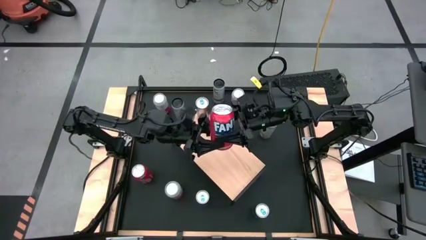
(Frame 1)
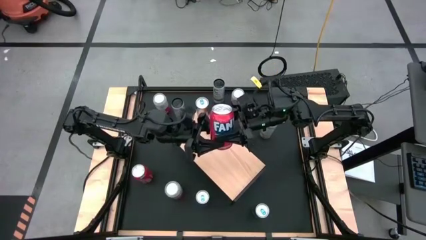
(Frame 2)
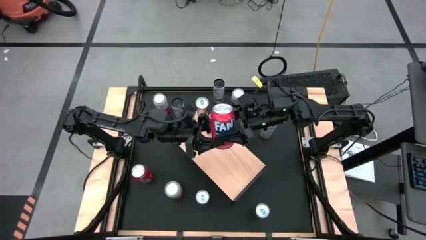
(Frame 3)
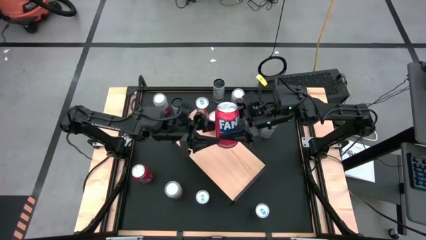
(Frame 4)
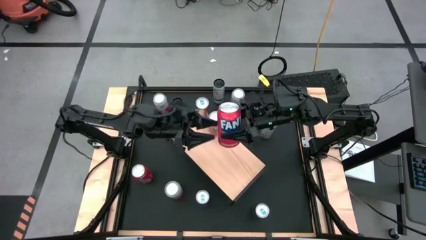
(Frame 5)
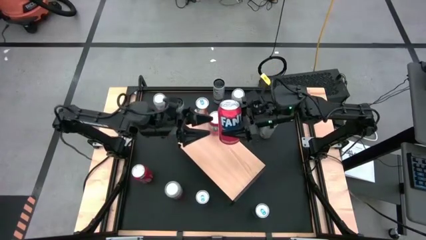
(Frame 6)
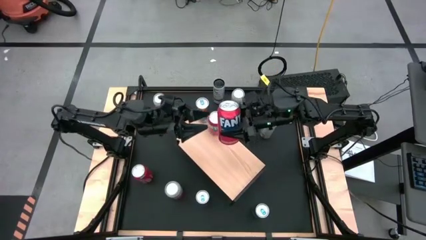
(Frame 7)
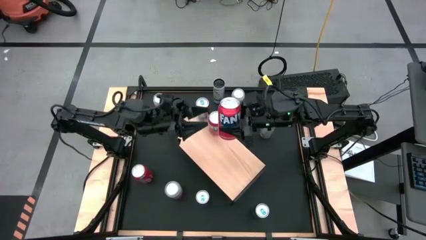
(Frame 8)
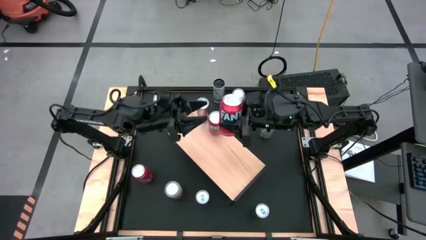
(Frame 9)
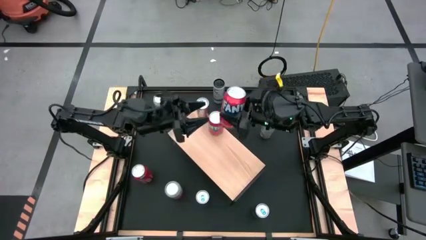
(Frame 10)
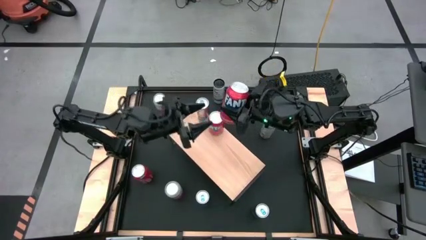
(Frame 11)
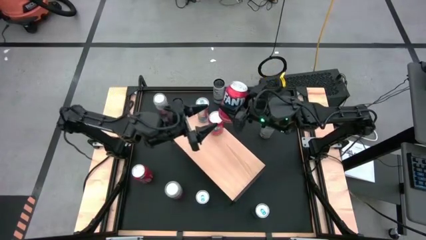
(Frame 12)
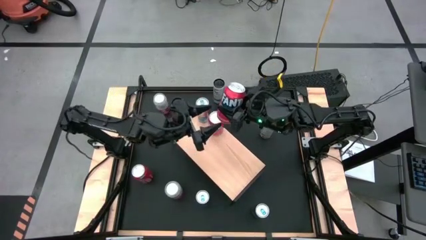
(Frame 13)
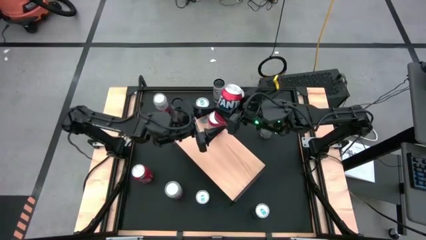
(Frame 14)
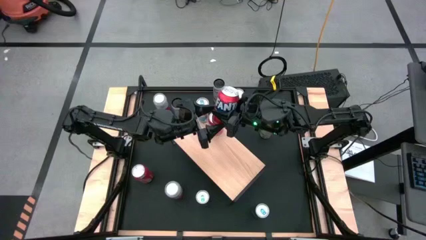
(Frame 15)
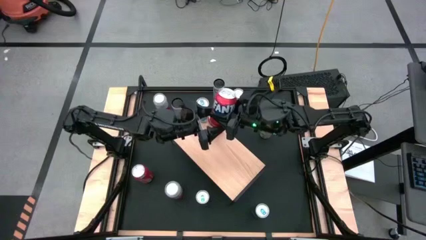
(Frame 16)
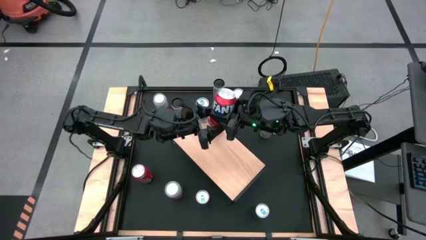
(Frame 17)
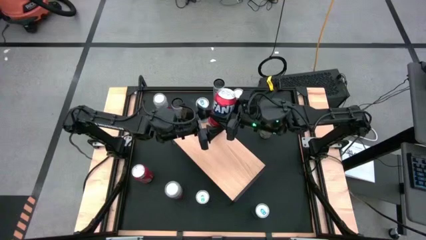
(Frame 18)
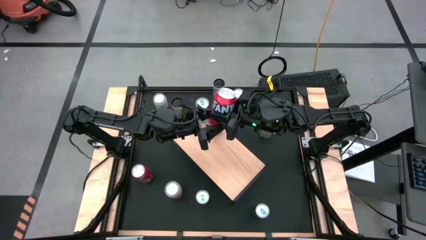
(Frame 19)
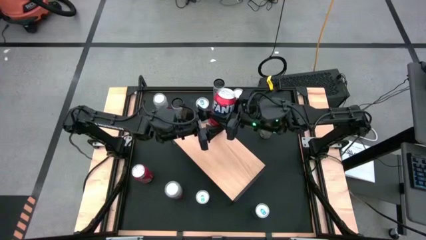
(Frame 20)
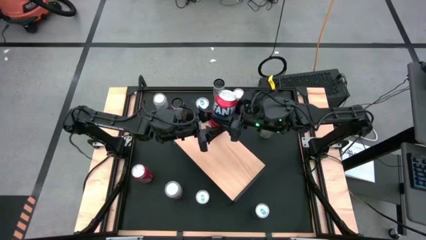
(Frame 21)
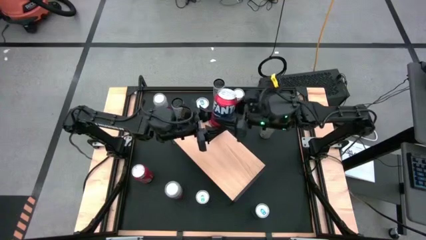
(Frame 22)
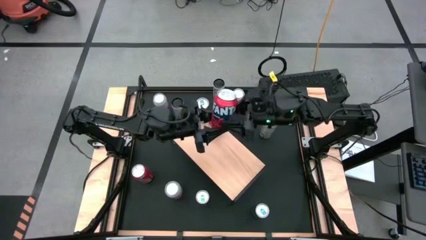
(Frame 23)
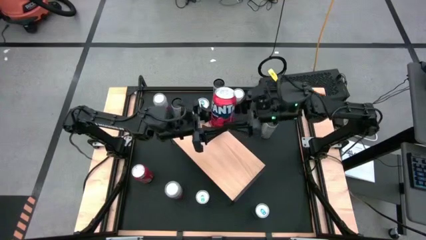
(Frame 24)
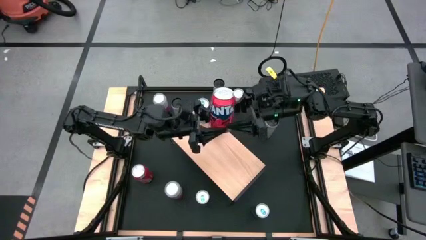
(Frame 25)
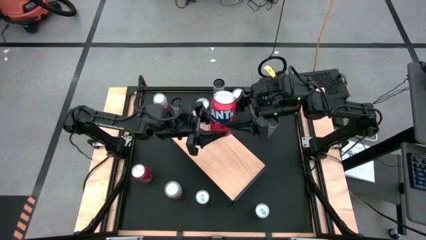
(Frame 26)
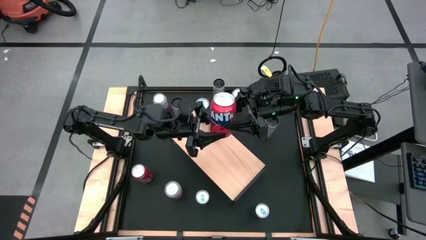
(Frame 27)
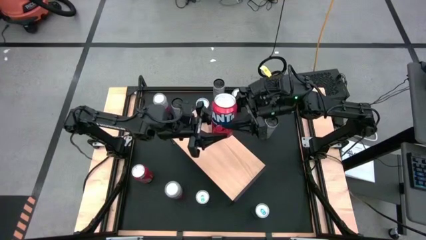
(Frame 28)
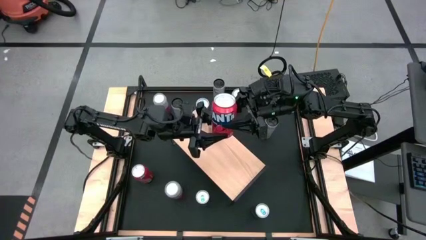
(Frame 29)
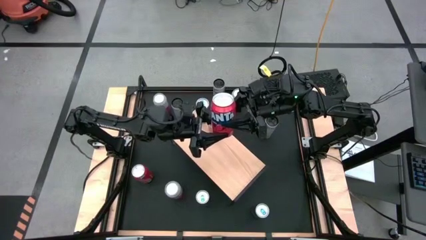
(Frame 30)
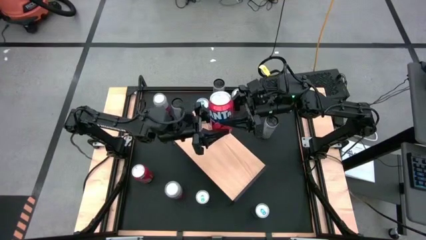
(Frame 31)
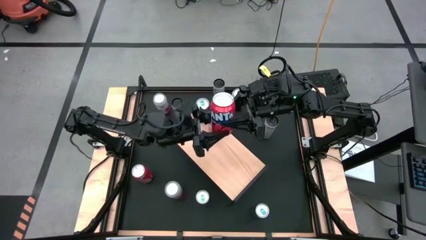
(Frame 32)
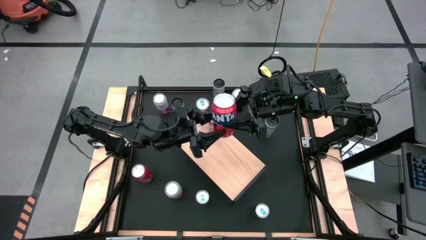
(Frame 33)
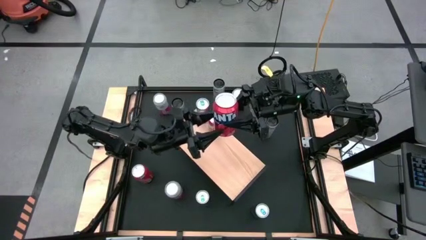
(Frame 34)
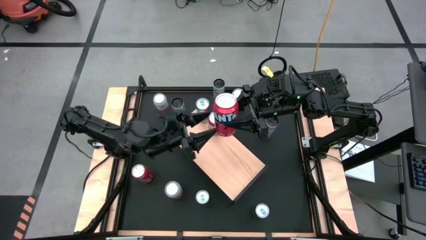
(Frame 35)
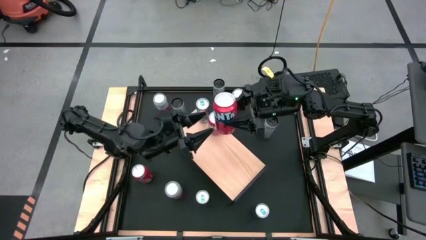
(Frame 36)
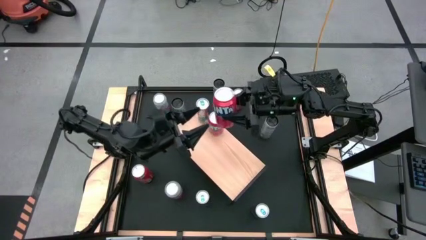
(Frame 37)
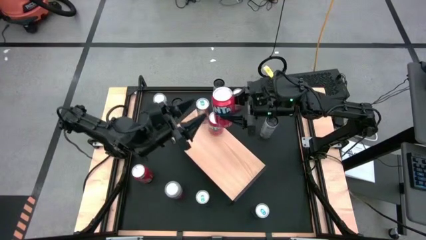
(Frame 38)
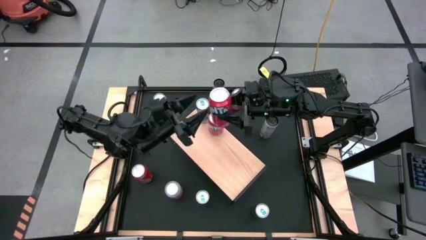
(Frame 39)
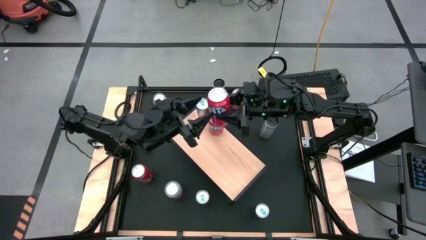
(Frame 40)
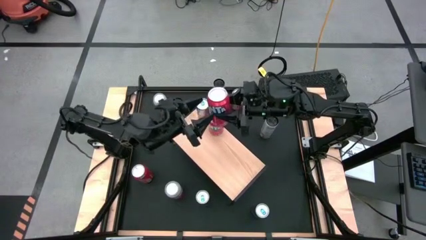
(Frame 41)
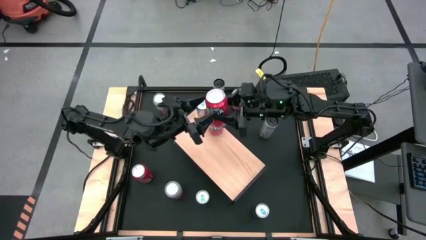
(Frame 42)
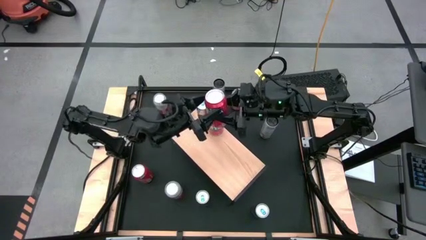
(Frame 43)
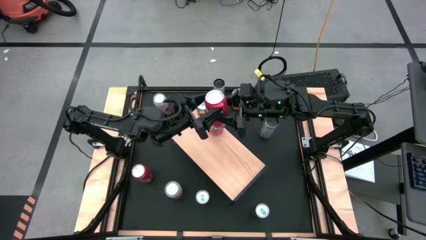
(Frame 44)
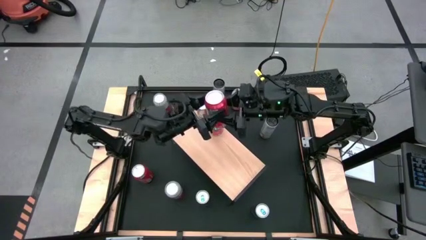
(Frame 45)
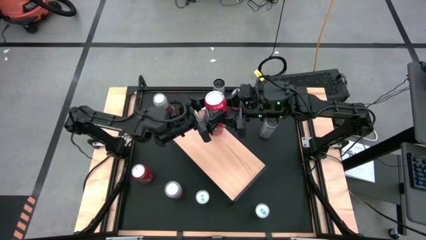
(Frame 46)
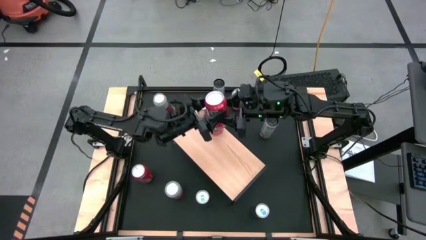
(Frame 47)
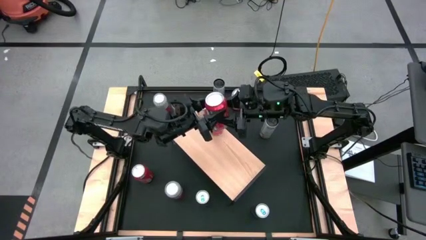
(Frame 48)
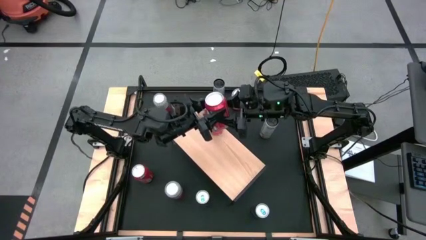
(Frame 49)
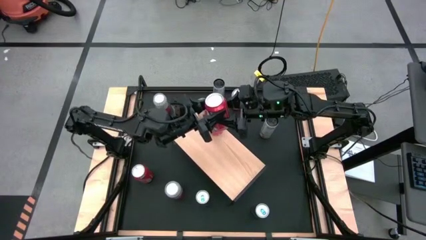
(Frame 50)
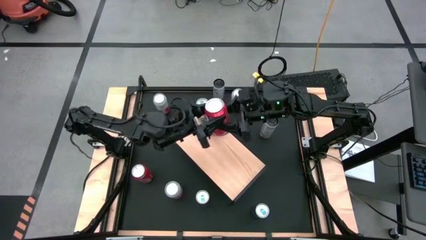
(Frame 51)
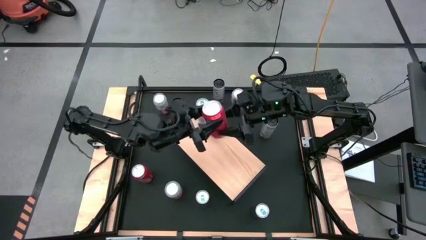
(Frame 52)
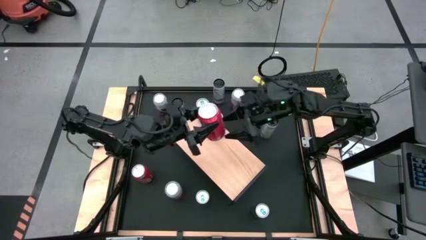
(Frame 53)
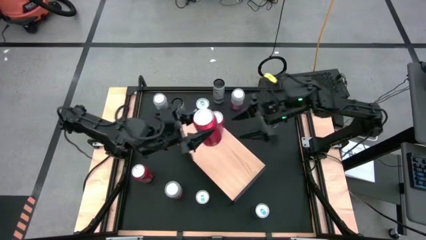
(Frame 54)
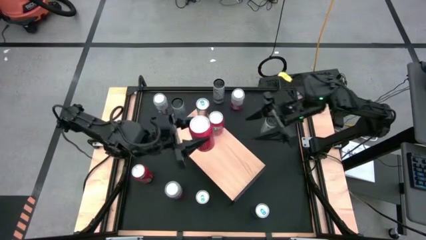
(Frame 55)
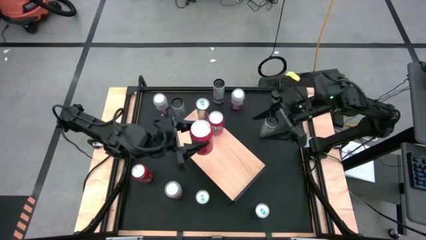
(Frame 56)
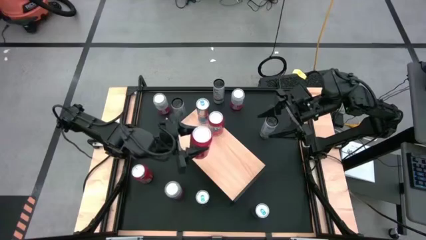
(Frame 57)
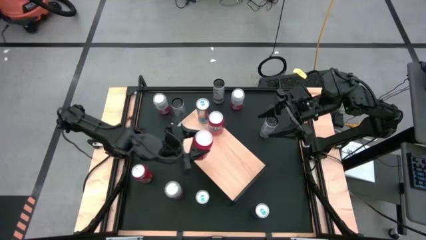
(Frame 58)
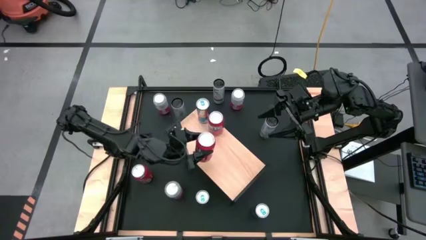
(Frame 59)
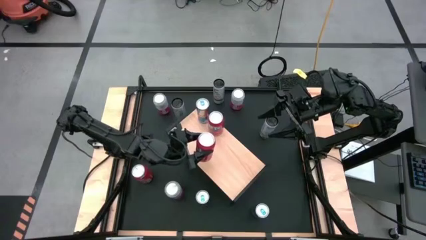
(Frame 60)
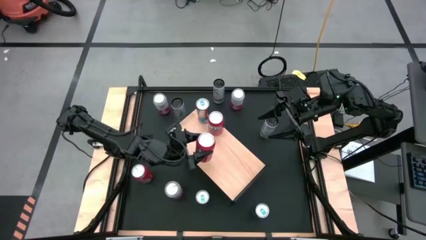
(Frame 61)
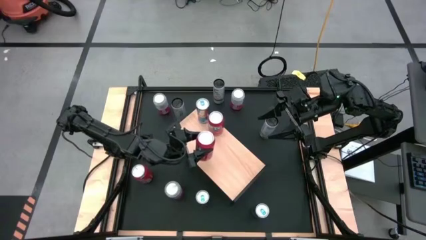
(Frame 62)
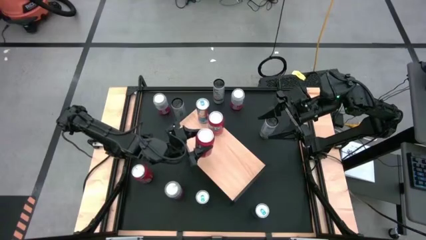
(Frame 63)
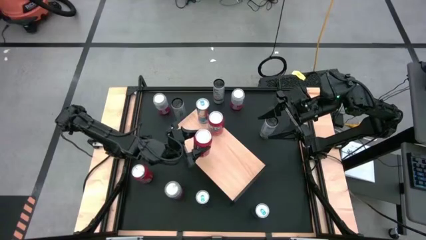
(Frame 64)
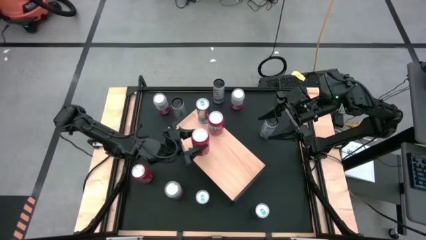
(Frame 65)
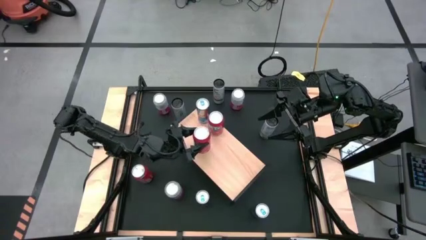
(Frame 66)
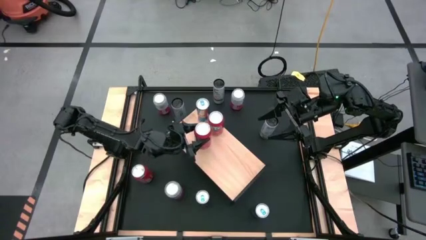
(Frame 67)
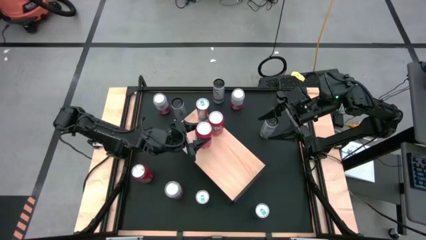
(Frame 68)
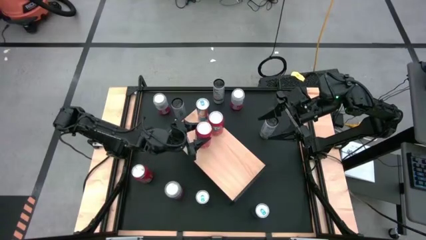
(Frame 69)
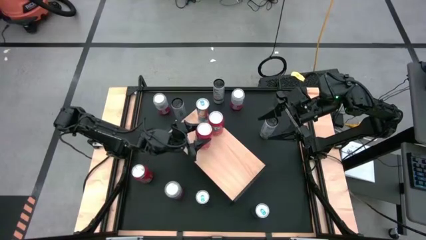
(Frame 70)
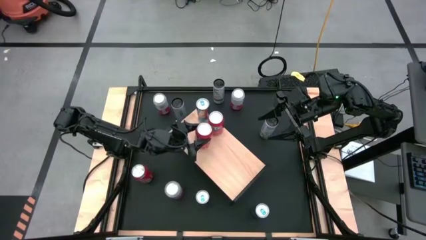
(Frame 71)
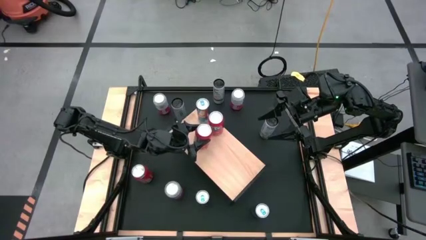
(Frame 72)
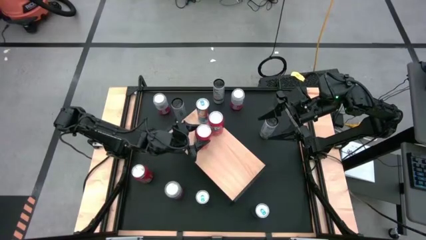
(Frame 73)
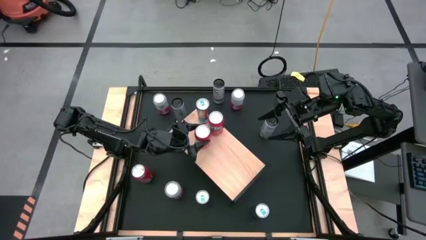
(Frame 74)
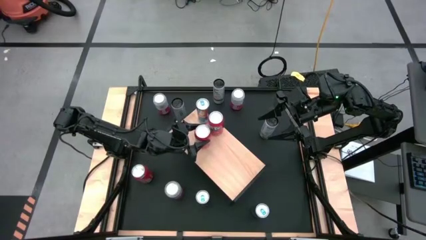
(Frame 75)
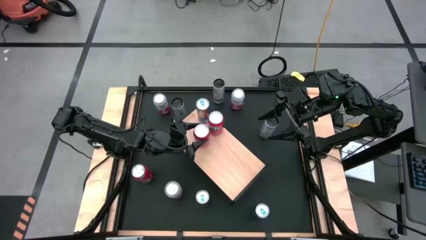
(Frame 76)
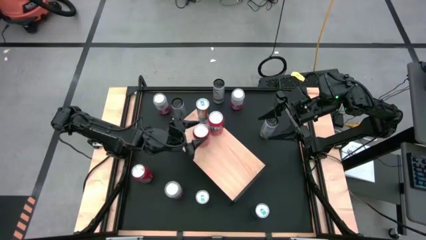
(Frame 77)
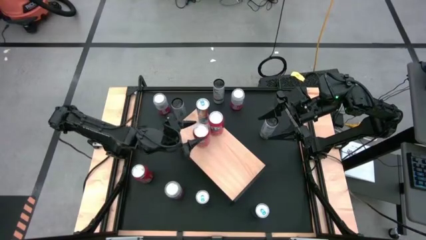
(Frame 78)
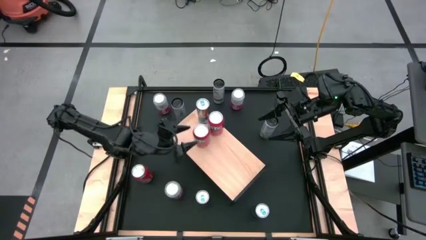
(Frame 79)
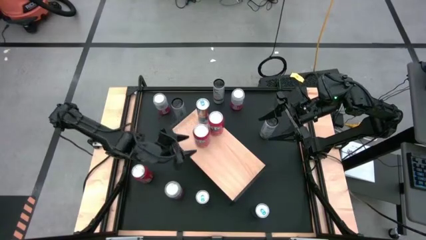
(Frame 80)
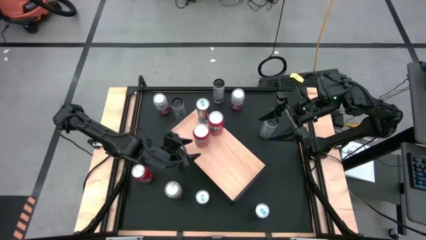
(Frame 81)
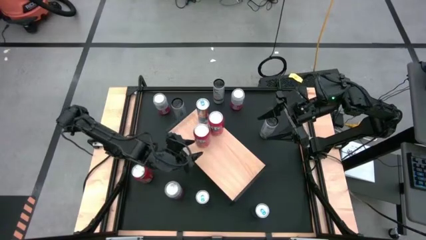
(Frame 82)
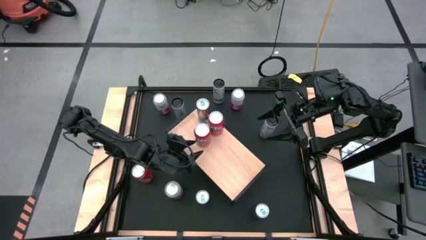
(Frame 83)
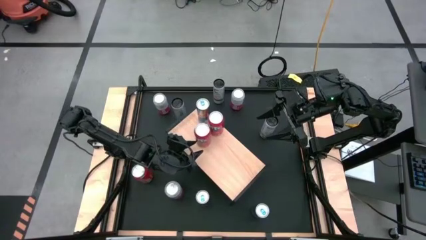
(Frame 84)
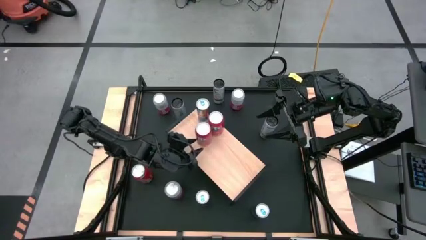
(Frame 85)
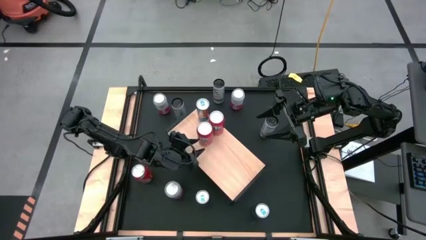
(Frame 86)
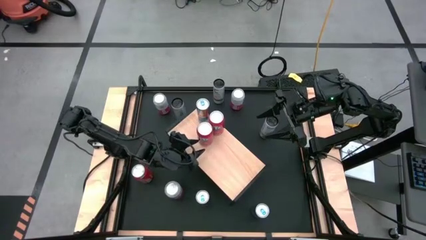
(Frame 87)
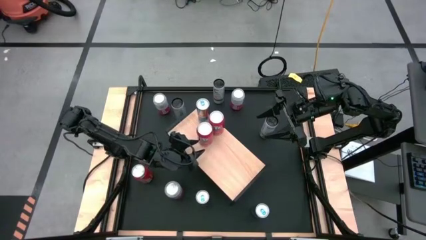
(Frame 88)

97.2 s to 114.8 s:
Task: Place canned beverage on shelf
Put the bottom red soda can on the shelf aligned with the other red soda can
